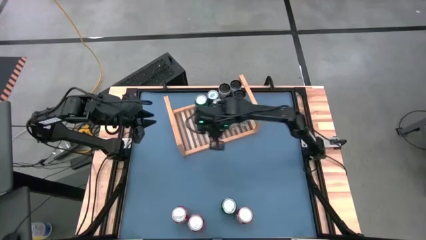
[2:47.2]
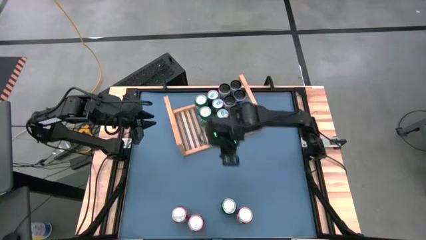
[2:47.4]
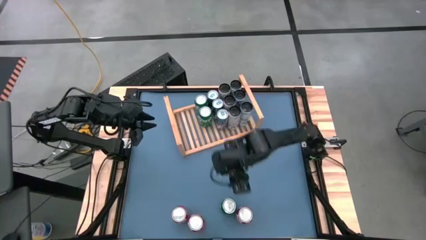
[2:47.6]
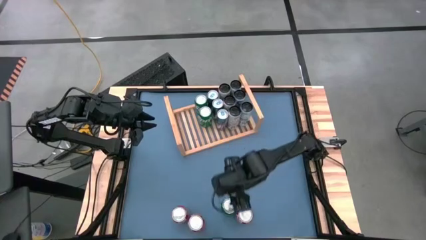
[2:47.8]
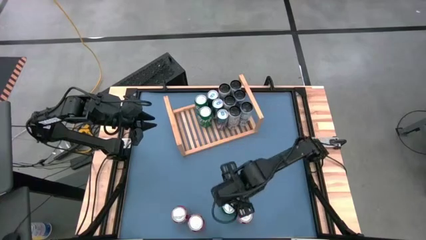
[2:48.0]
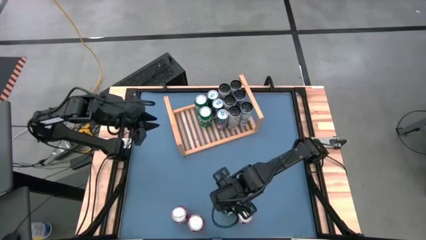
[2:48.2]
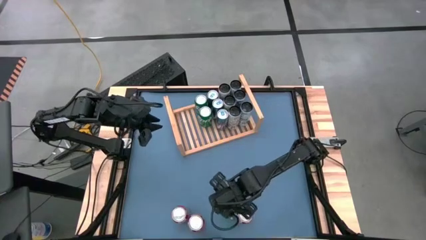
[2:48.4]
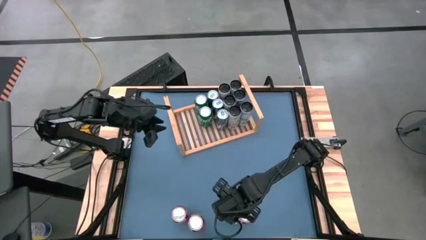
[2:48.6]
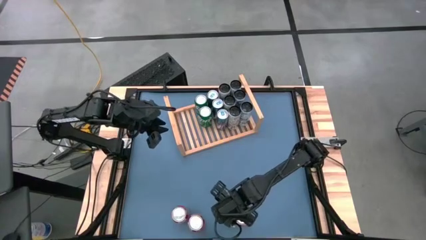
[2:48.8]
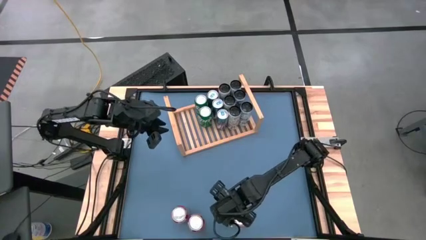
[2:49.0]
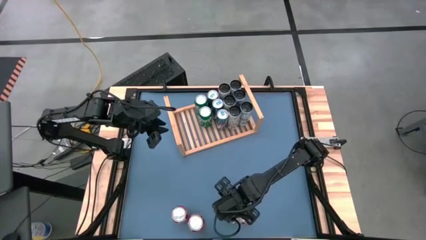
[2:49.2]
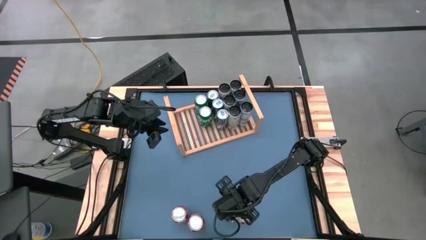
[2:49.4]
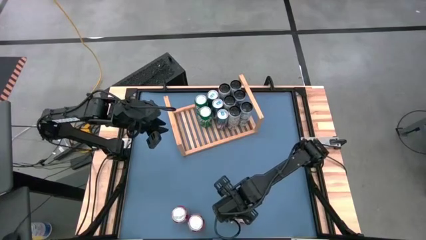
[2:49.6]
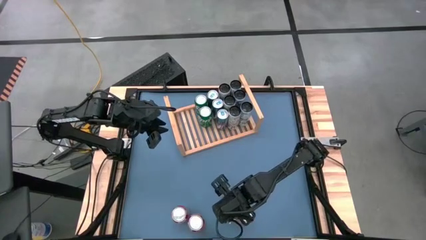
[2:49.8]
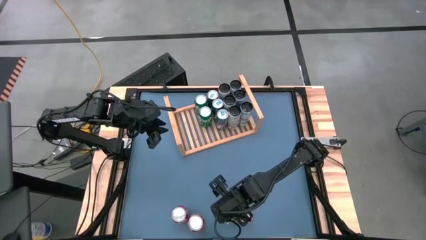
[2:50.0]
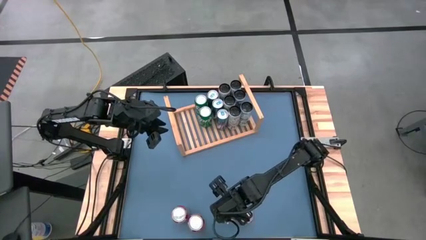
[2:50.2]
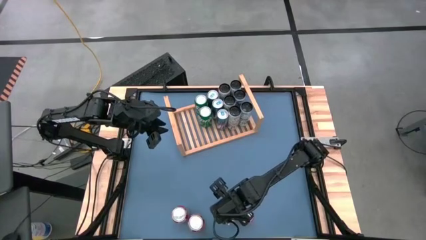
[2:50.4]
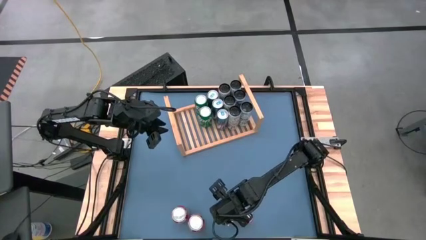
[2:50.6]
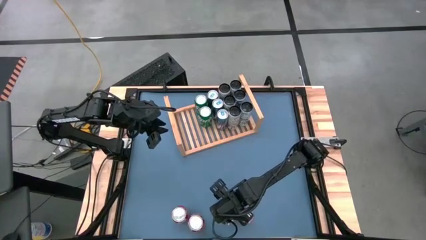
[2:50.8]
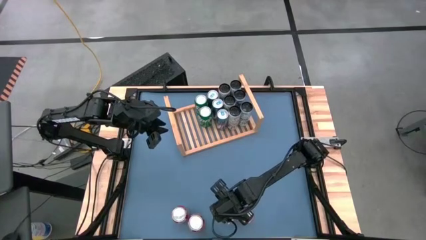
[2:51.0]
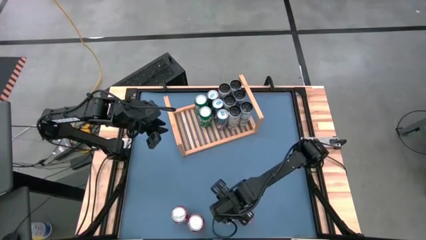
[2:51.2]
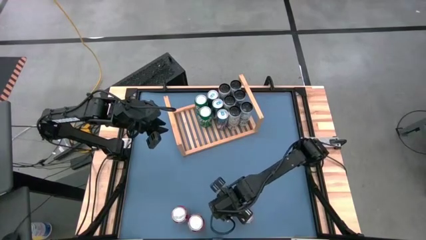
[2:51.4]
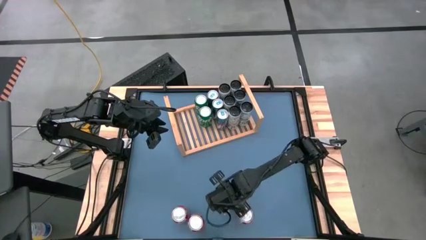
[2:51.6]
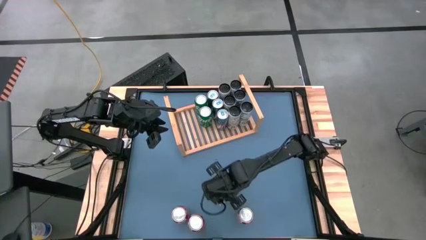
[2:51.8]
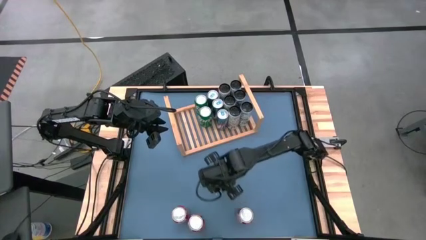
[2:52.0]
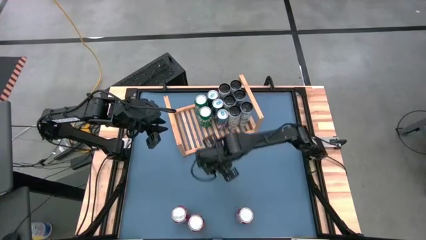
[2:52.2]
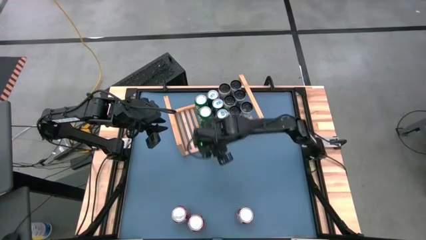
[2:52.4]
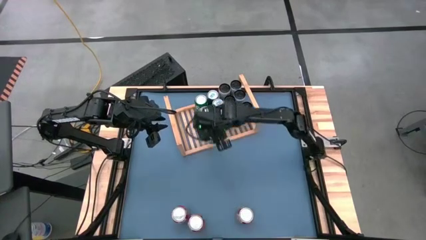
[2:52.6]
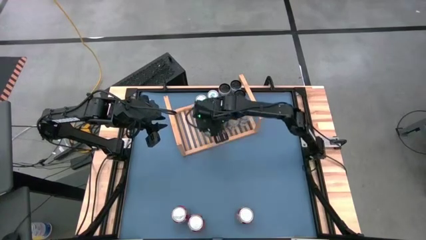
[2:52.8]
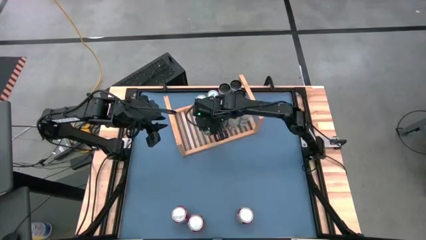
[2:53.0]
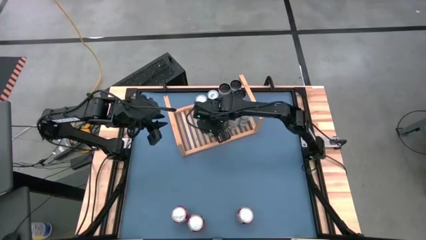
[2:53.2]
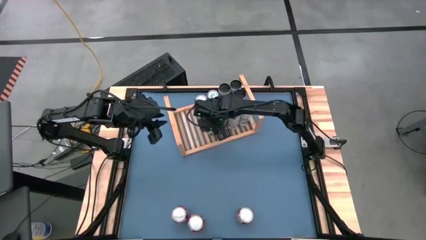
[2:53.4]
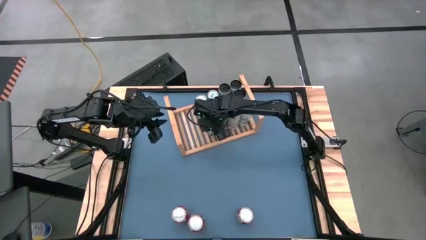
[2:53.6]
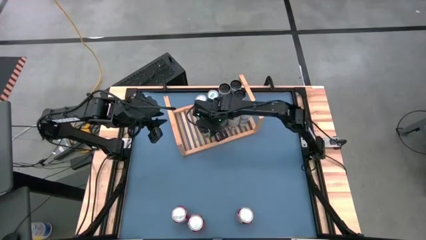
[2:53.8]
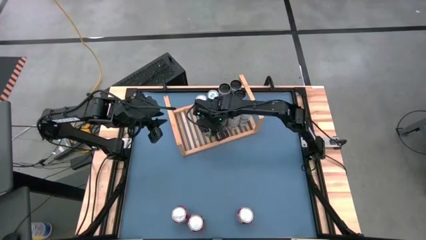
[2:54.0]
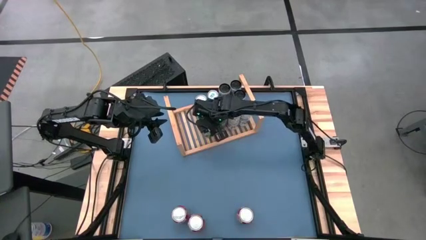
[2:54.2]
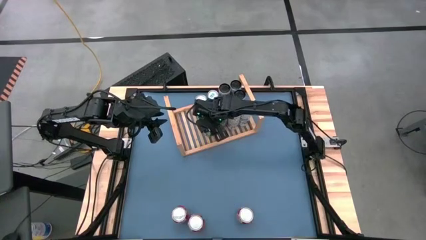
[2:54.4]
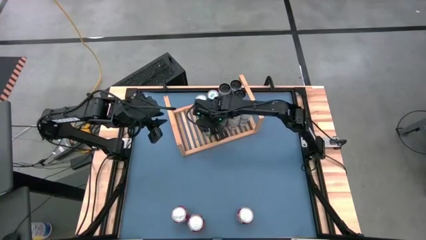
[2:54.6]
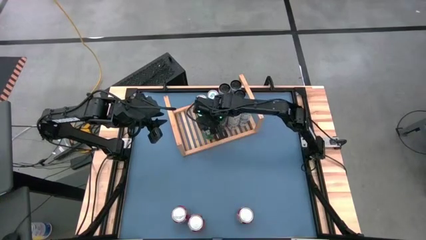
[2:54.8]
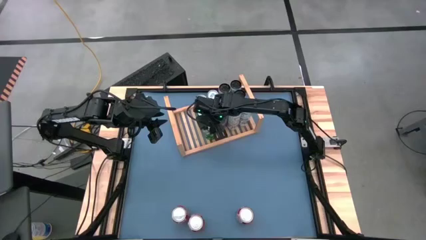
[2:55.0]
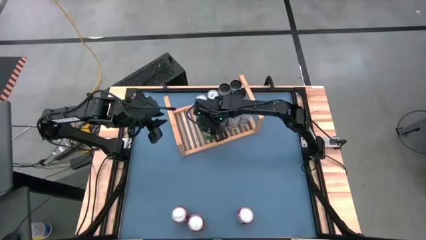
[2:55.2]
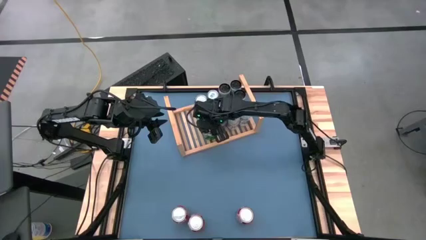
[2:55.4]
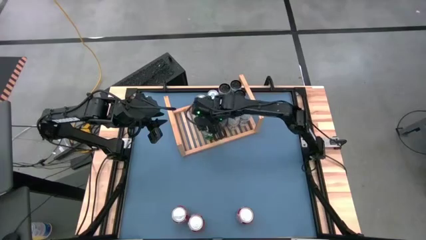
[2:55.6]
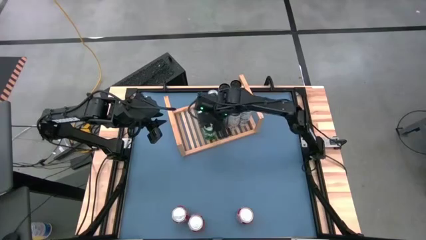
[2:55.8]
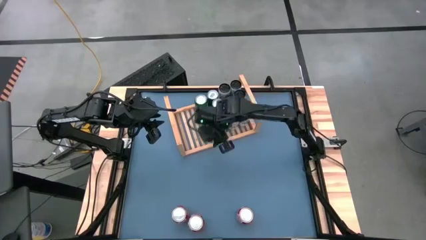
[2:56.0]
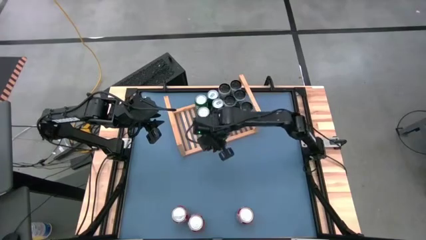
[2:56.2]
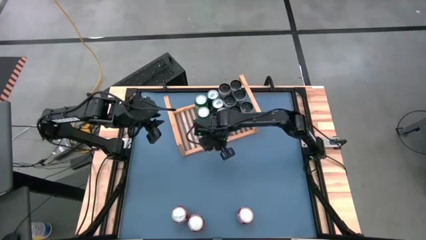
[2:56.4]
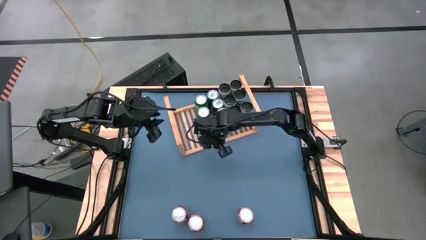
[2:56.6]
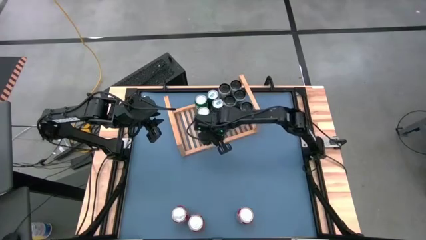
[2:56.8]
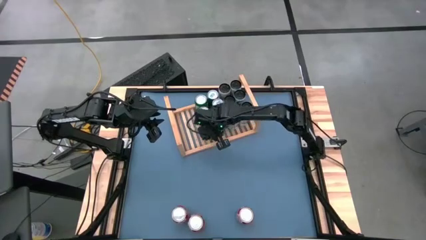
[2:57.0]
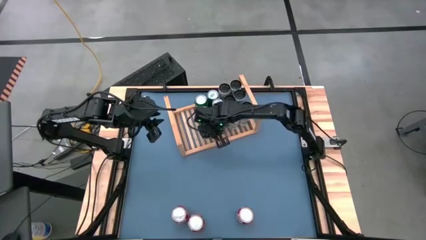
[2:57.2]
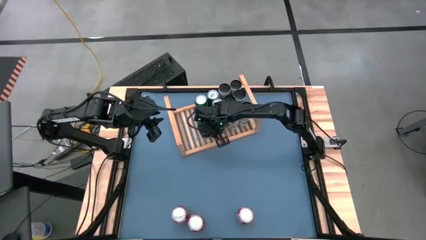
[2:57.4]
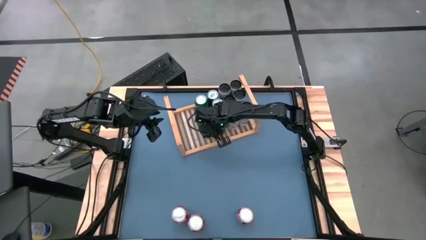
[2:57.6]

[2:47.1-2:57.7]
Task: Place canned beverage on shelf
Put the green soda can on the shelf aligned with the other green soda cans

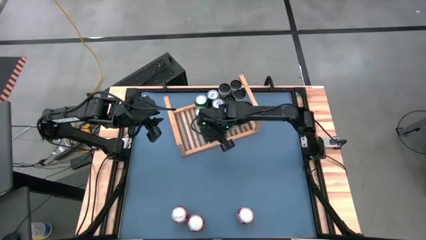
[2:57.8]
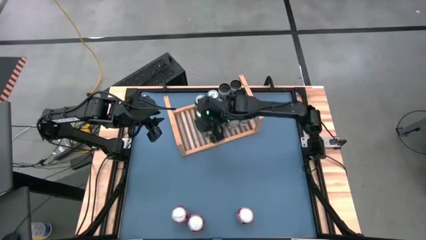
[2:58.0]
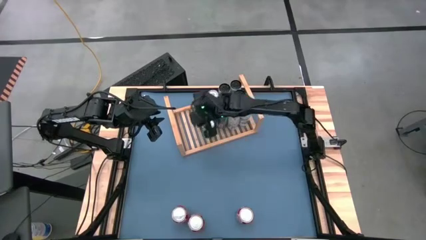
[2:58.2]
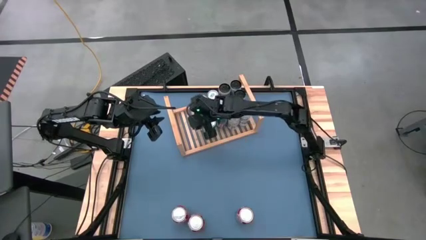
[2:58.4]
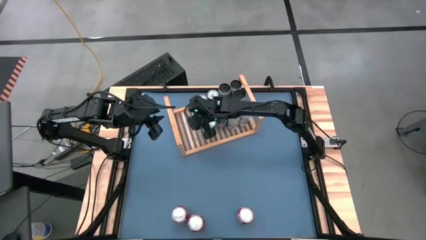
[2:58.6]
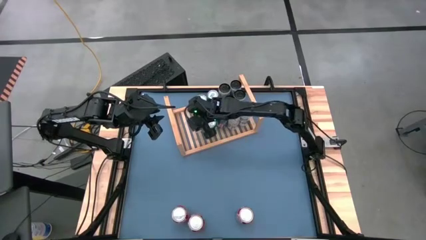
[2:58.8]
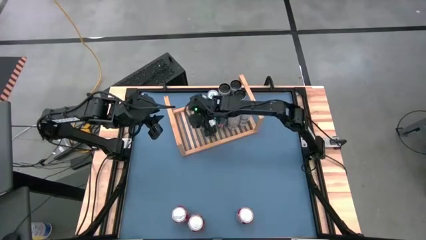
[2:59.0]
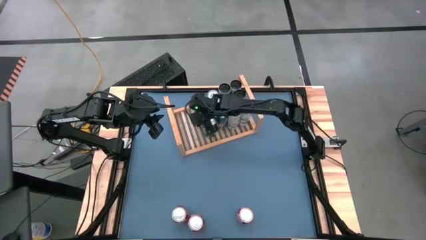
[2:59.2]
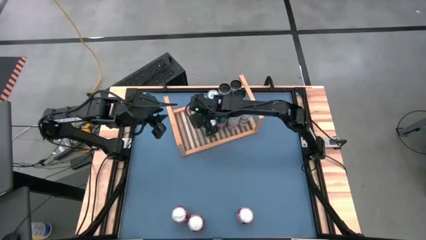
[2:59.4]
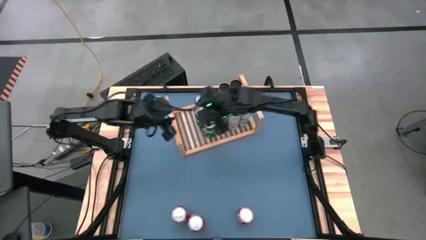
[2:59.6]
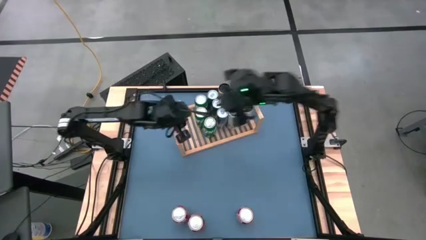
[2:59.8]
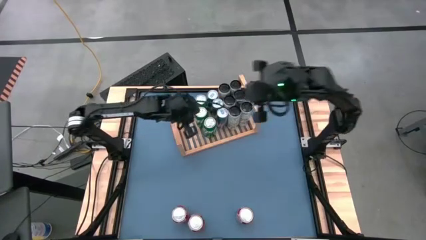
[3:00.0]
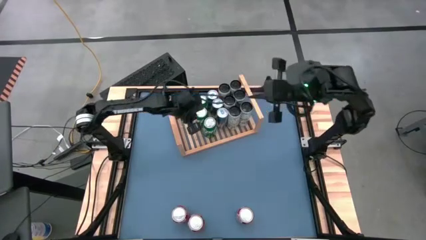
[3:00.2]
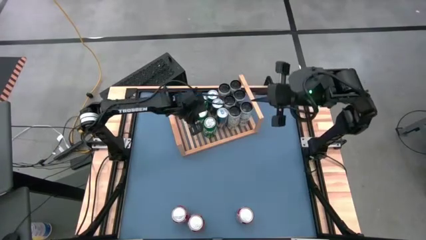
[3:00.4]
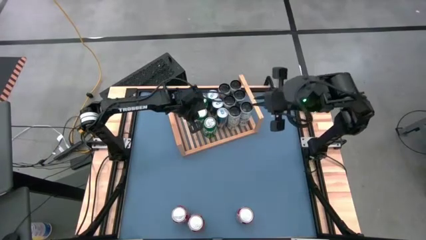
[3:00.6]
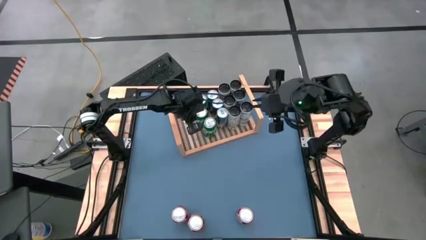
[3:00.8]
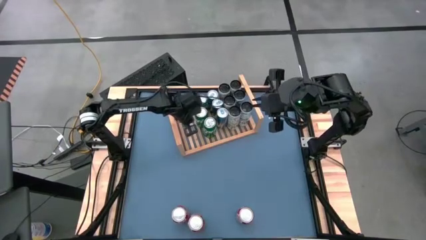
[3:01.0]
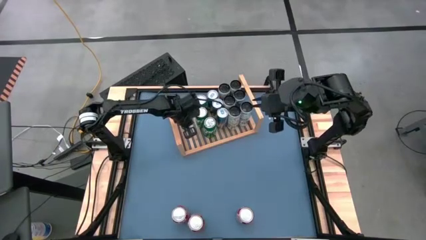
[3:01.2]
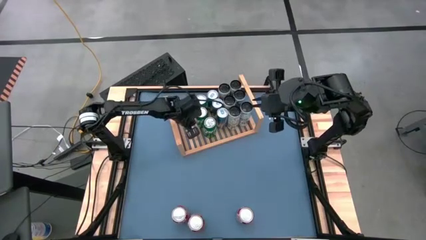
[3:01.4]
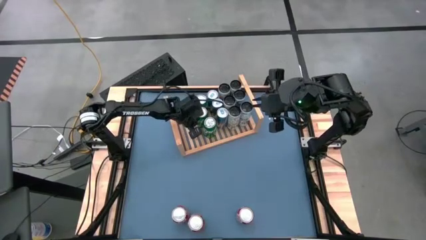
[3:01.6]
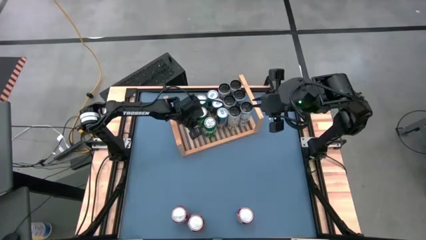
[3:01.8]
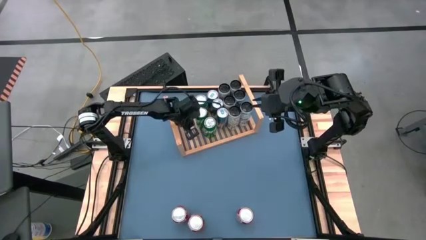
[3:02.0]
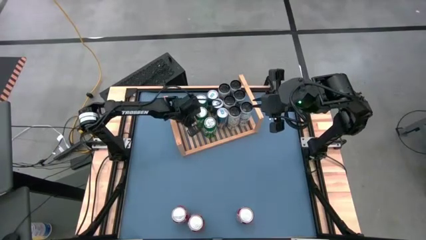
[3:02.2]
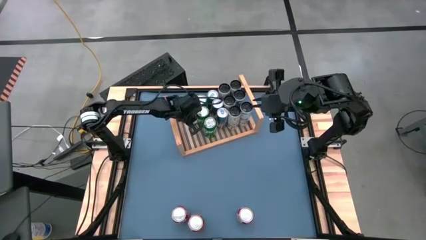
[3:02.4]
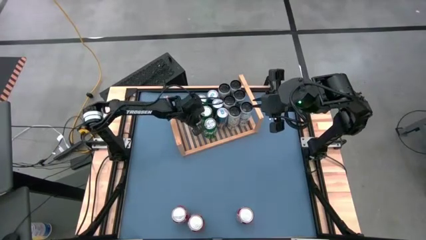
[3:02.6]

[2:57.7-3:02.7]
Adjust the green soda can
